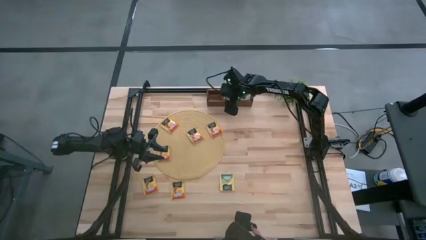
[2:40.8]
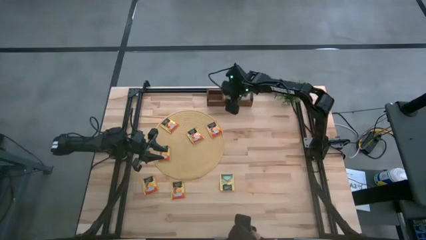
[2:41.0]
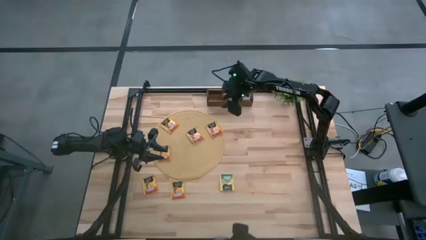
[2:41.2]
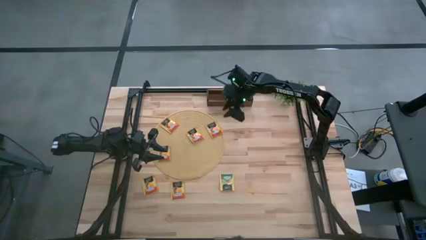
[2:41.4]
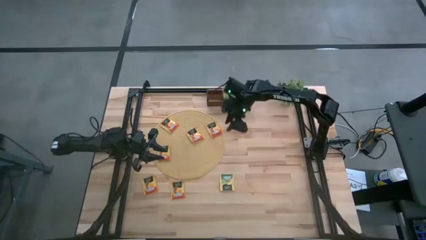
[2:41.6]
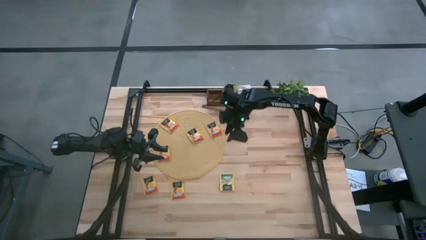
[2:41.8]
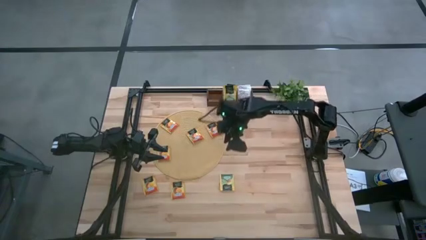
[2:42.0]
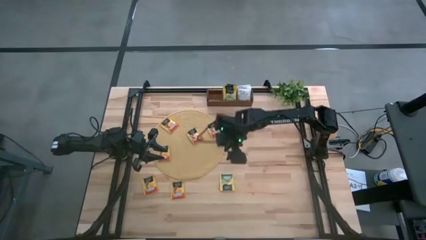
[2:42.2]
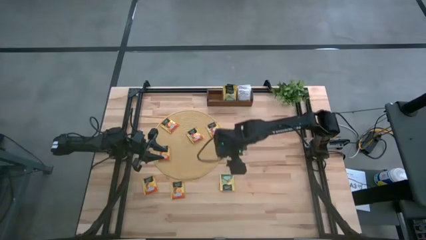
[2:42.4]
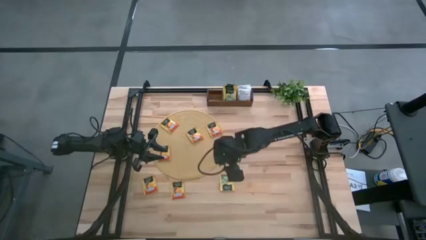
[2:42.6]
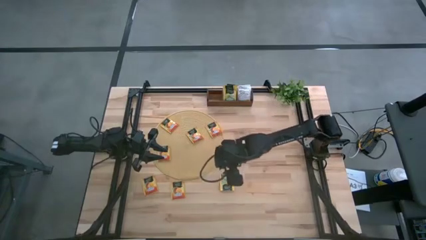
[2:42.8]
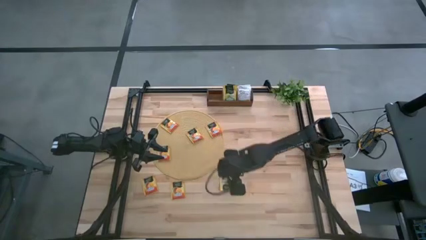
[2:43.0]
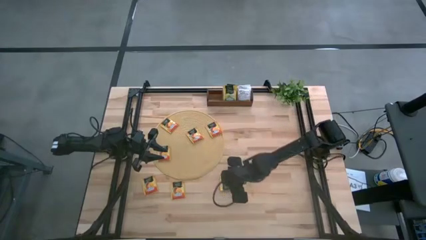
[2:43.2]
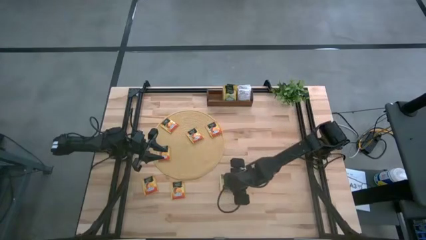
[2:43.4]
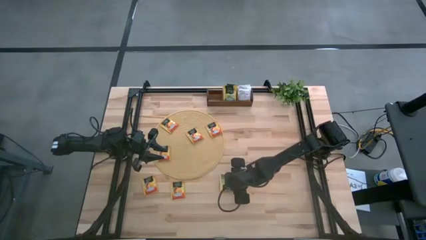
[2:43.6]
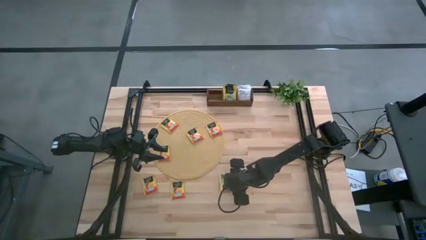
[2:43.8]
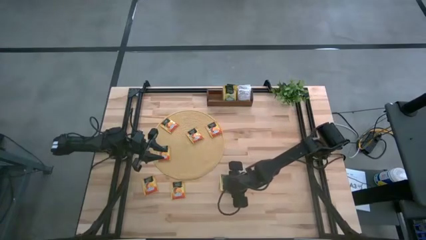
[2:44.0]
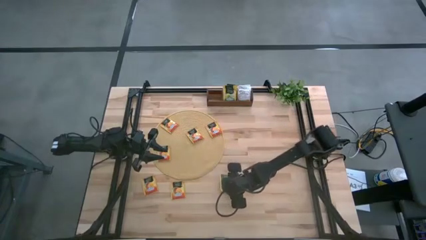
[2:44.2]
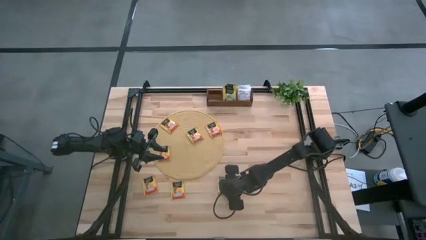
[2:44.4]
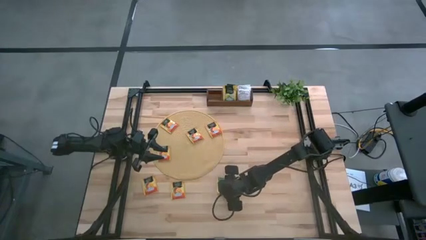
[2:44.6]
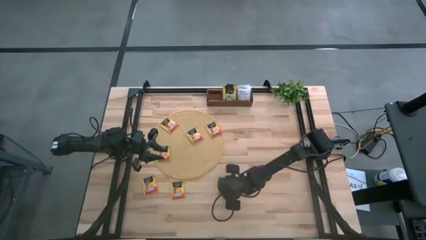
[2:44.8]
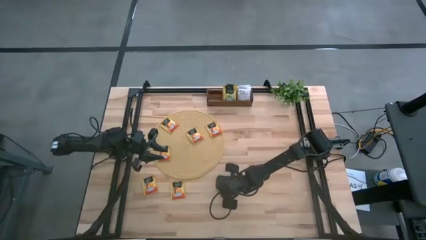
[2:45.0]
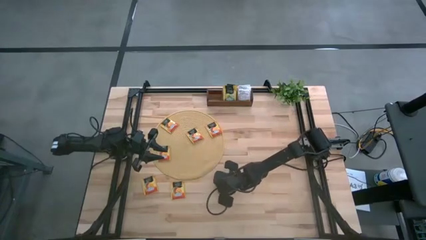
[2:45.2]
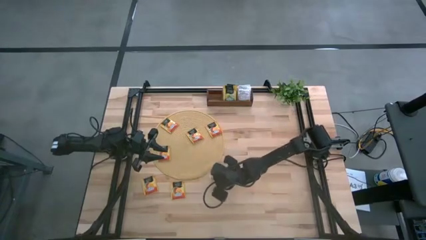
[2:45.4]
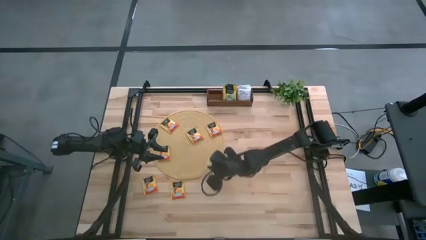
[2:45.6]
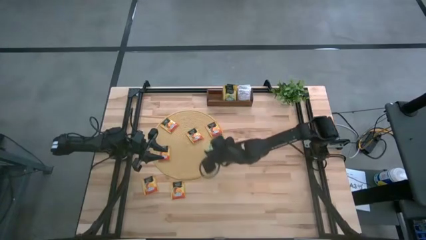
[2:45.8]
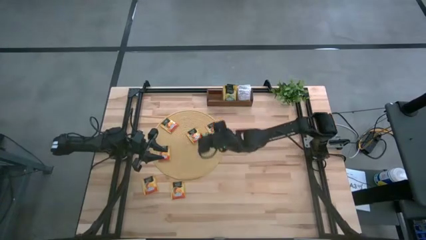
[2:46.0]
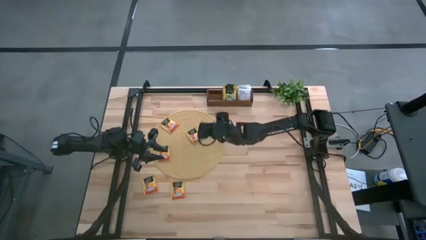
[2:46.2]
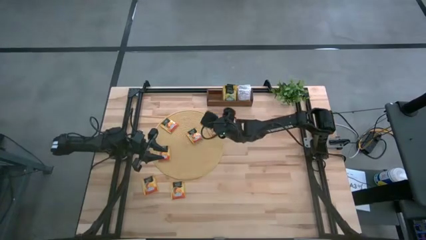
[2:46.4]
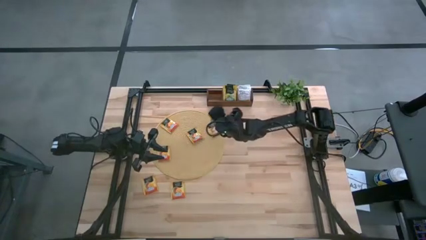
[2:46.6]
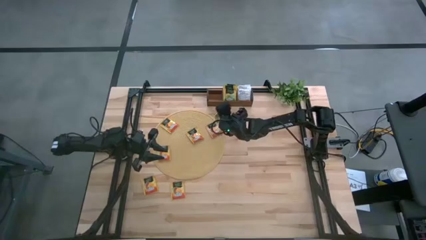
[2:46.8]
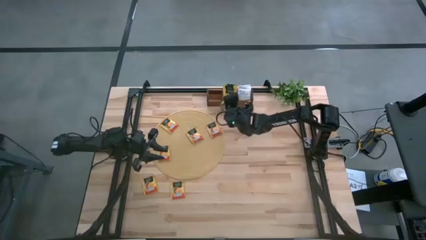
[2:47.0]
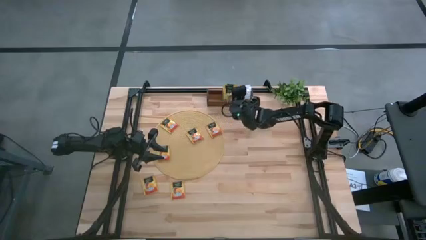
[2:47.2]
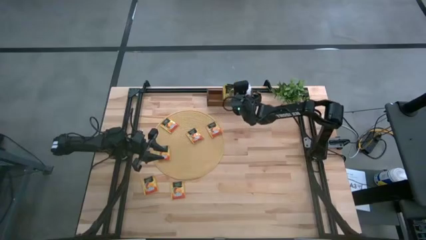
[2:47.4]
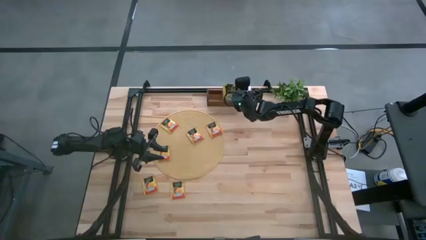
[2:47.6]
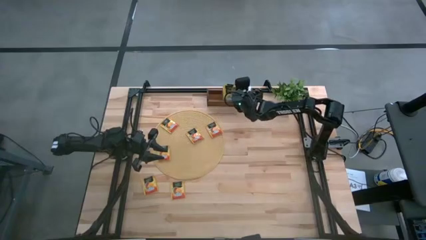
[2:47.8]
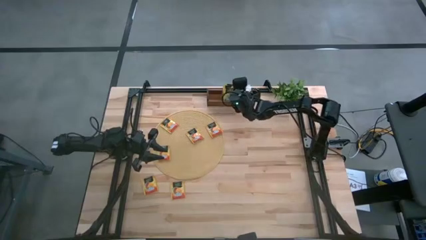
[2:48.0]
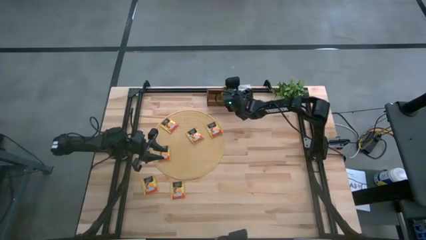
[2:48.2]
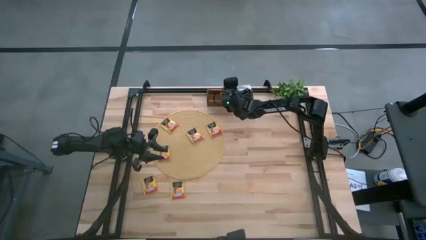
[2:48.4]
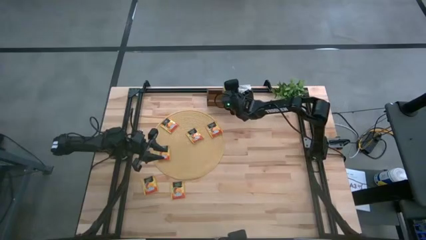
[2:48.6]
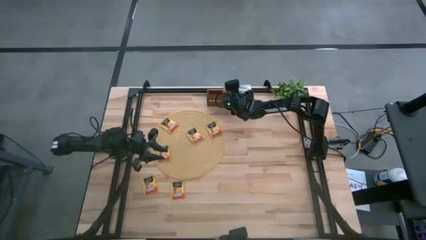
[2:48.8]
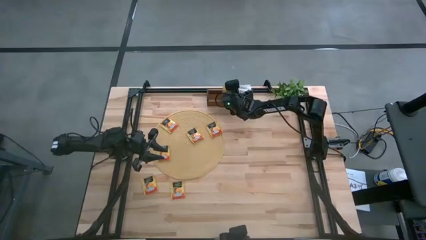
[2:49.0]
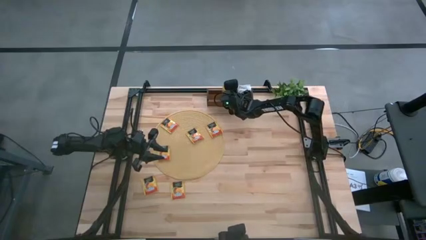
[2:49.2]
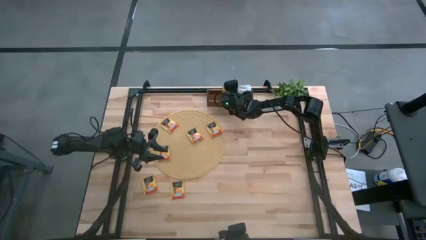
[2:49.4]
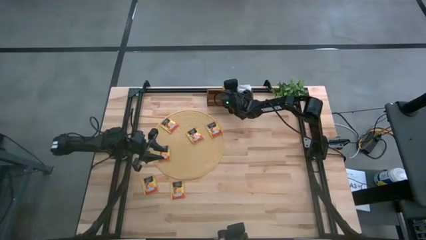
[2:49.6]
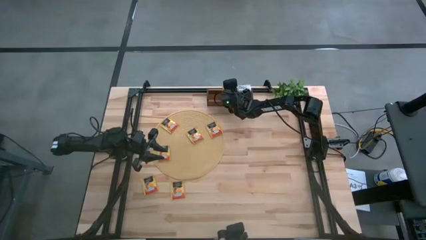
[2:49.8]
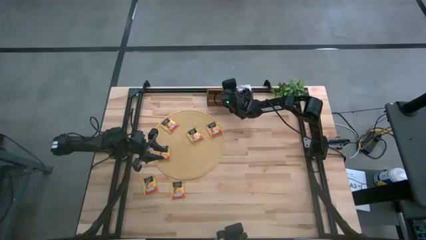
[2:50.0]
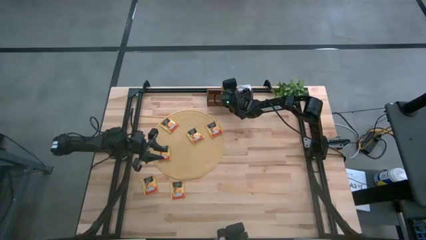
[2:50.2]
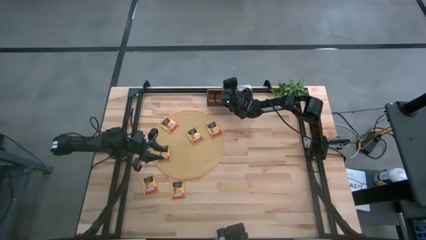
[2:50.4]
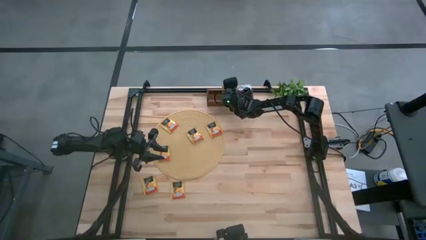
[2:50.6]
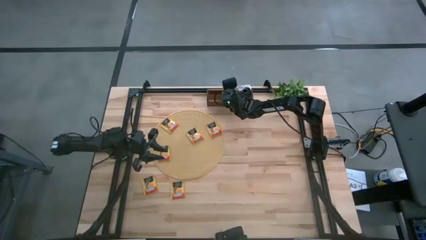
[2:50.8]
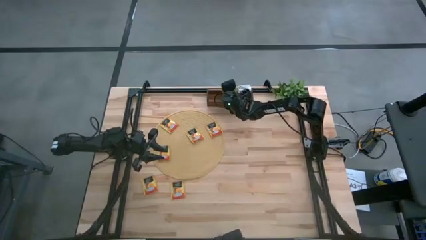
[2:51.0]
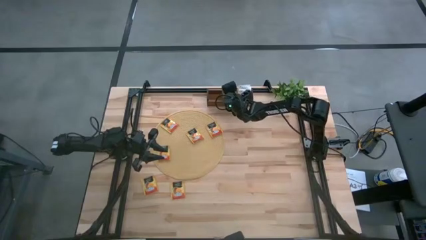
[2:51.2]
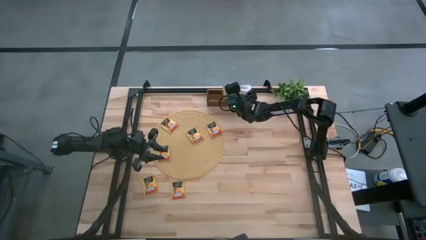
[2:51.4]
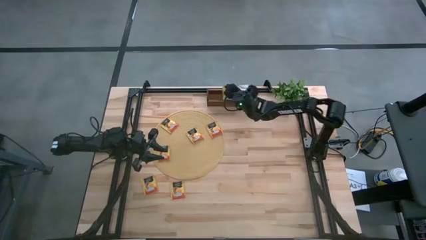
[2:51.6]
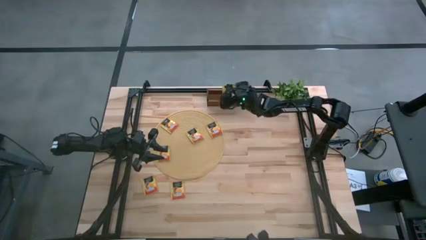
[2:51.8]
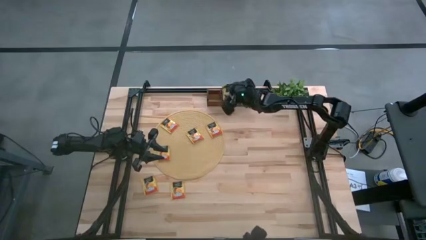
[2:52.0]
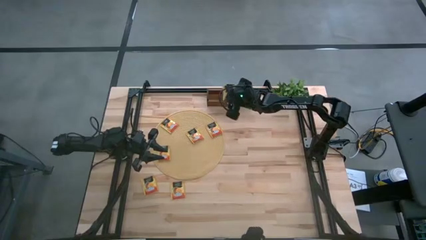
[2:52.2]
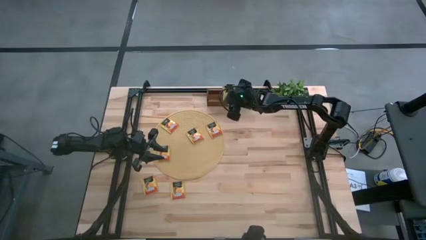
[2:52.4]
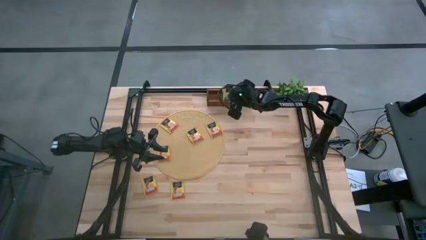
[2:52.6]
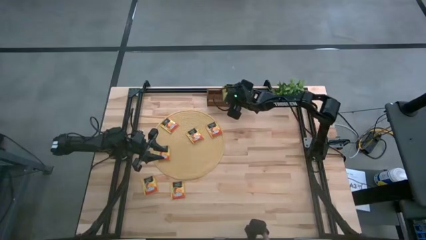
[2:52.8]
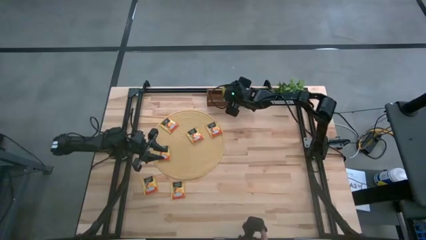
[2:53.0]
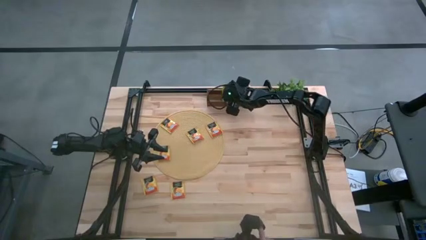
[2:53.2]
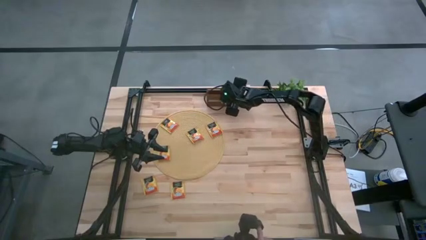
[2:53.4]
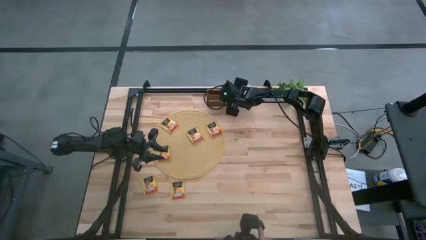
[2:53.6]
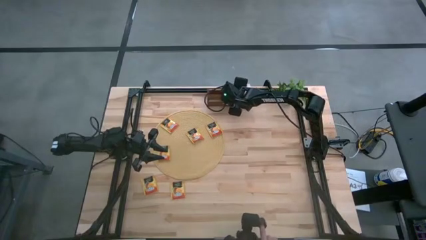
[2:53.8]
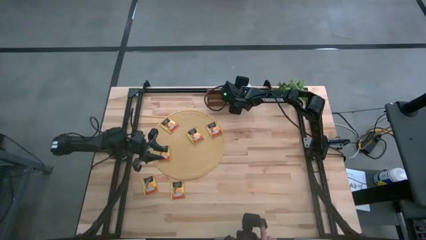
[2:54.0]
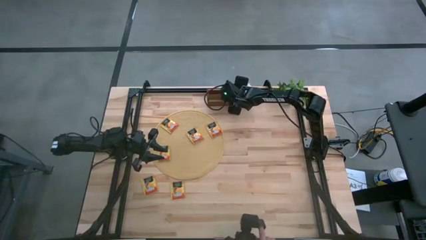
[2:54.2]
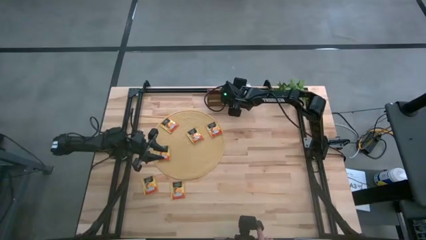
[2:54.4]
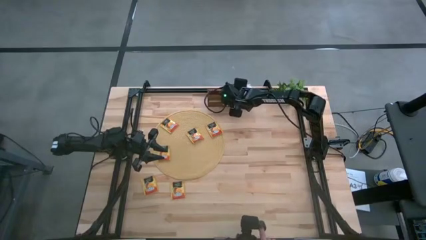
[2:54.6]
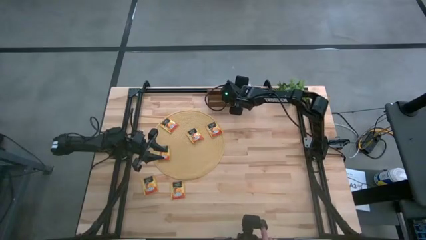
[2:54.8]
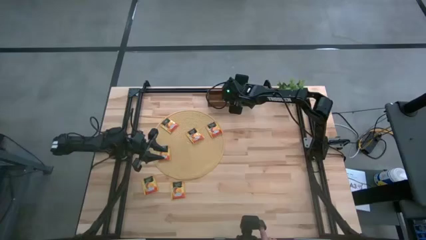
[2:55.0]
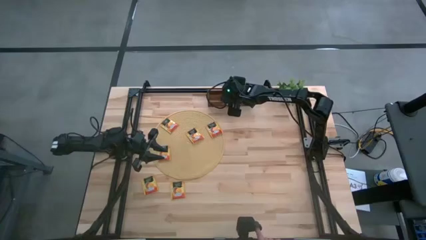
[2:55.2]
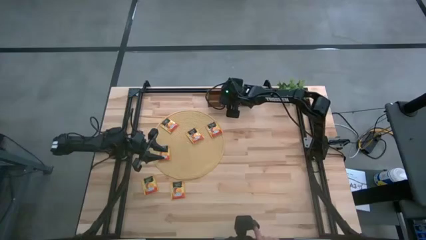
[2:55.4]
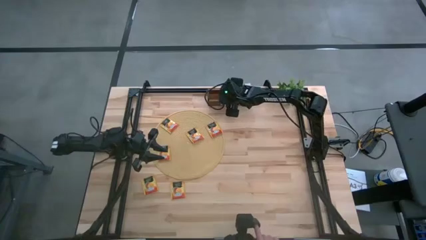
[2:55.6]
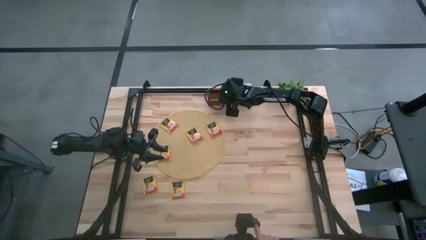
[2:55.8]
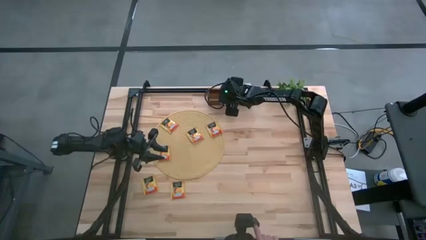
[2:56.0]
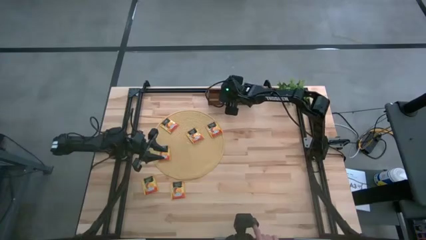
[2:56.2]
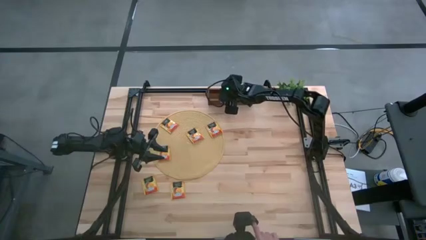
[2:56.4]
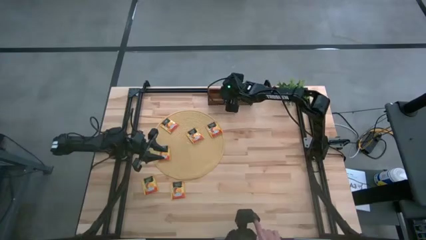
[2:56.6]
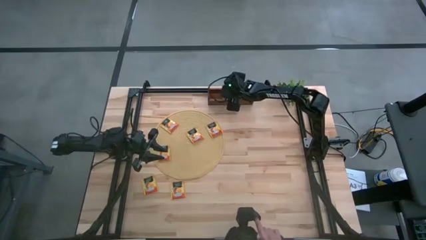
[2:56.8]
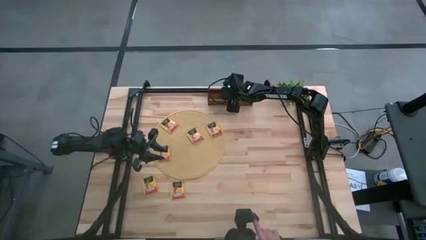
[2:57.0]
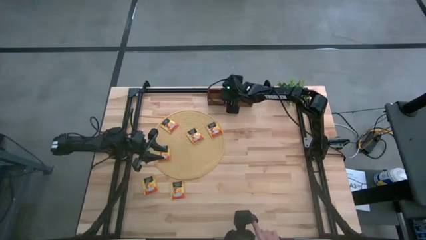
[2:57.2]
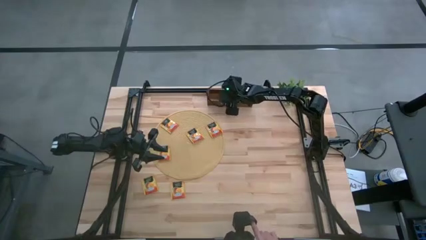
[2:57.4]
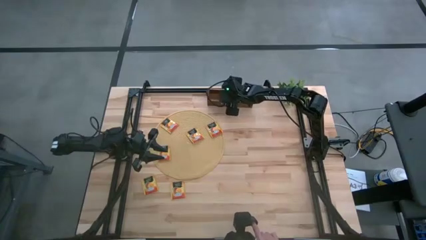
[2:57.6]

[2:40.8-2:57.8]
Task: Pick & Place Tea
Put the yellow tea bag into the middle section of the wooden organizer
